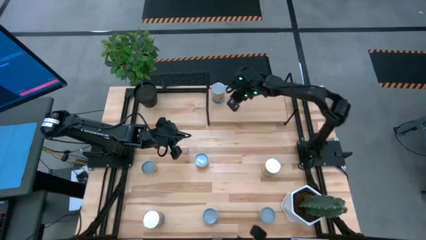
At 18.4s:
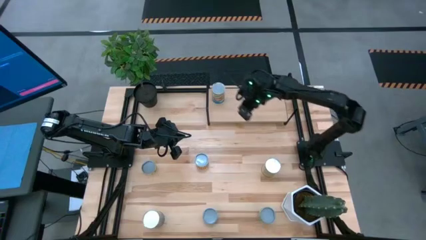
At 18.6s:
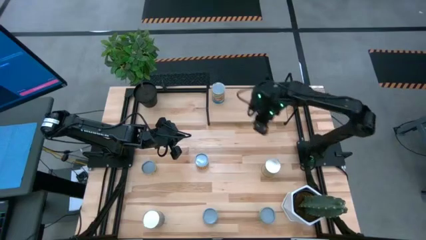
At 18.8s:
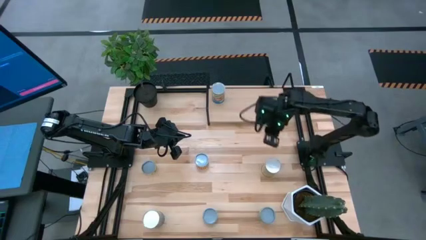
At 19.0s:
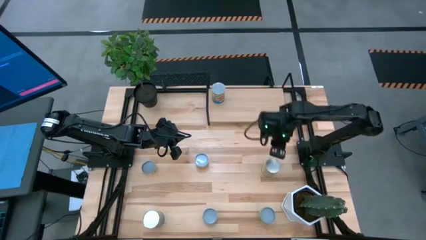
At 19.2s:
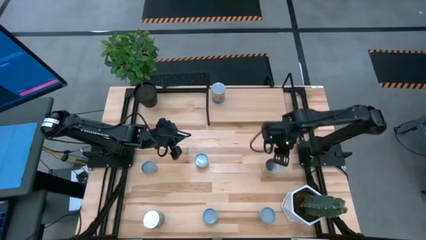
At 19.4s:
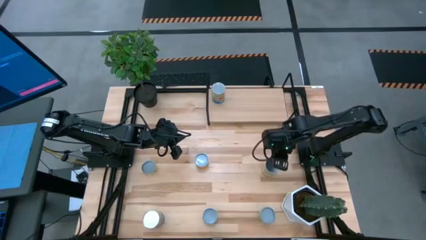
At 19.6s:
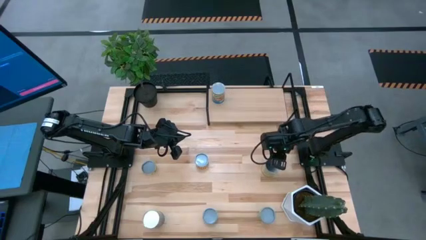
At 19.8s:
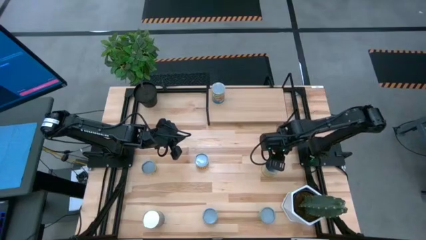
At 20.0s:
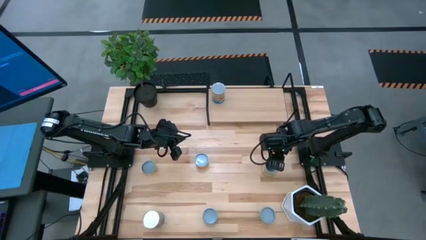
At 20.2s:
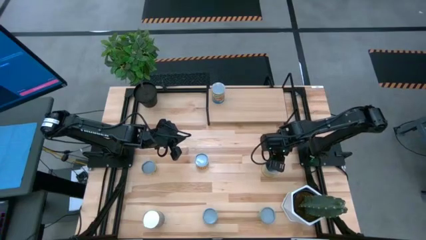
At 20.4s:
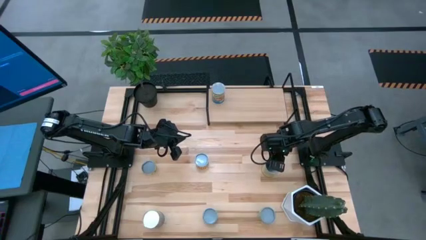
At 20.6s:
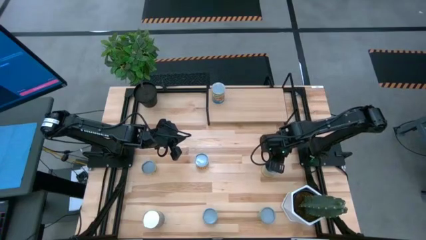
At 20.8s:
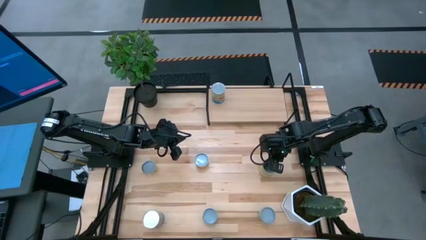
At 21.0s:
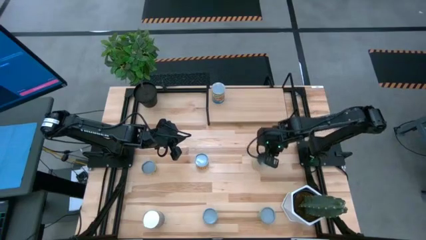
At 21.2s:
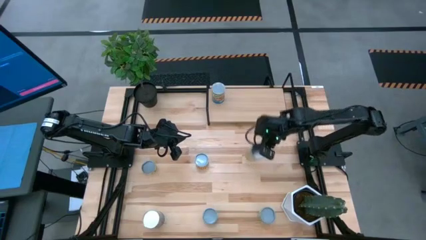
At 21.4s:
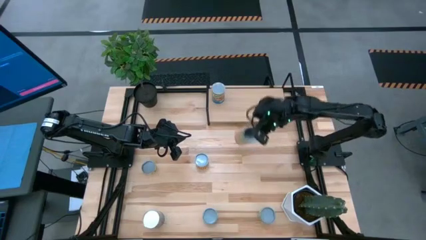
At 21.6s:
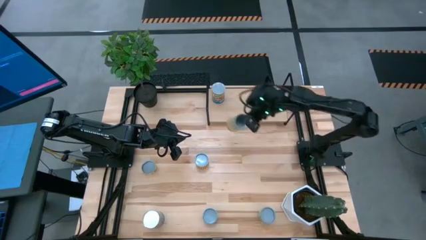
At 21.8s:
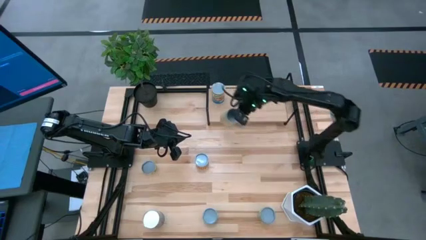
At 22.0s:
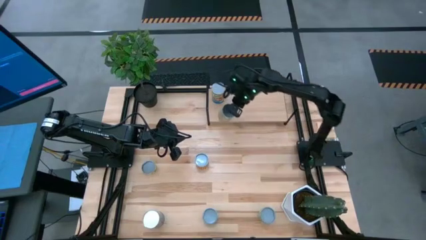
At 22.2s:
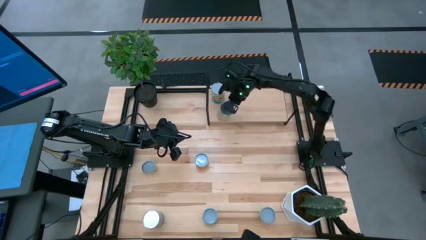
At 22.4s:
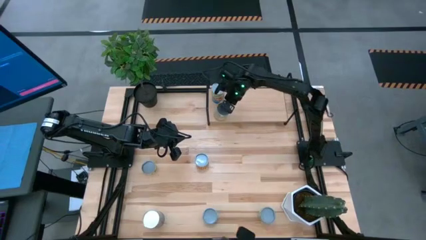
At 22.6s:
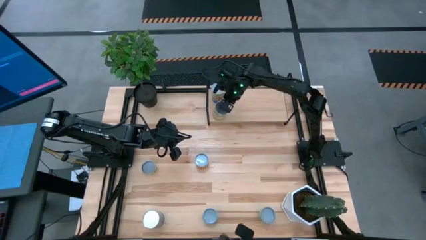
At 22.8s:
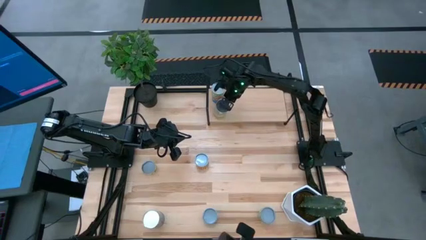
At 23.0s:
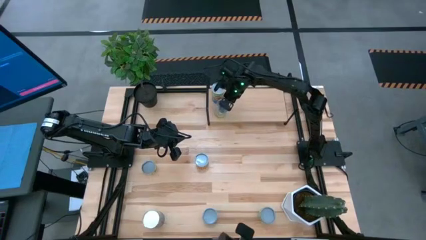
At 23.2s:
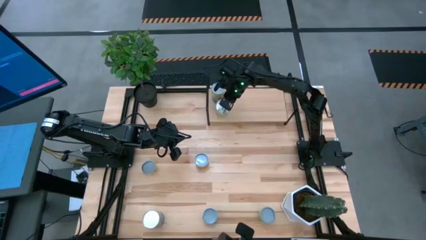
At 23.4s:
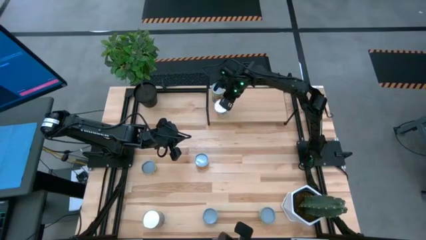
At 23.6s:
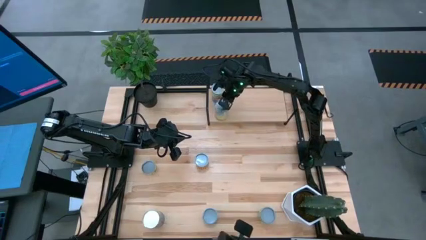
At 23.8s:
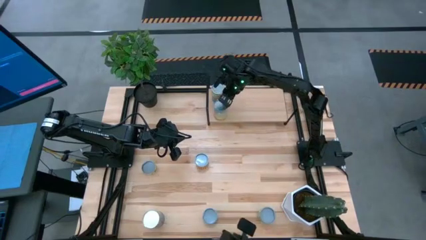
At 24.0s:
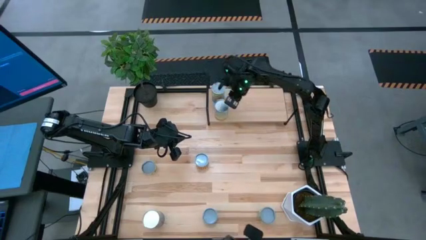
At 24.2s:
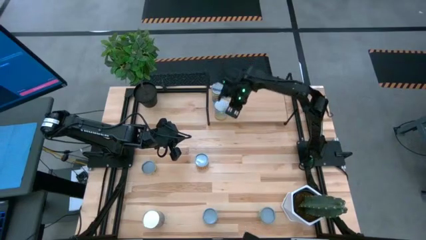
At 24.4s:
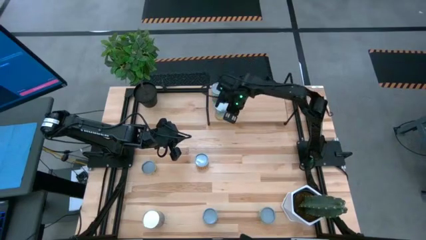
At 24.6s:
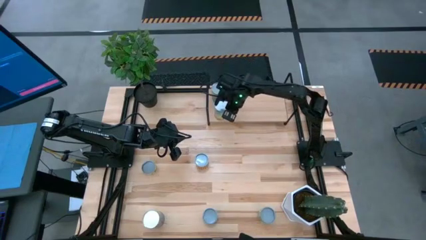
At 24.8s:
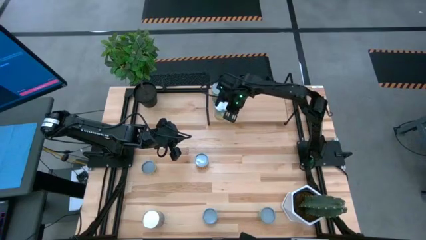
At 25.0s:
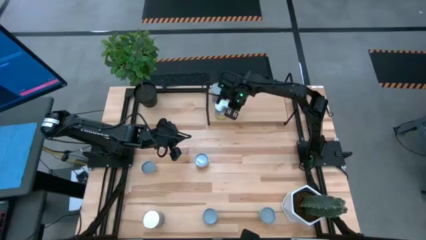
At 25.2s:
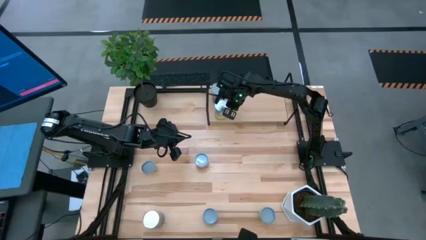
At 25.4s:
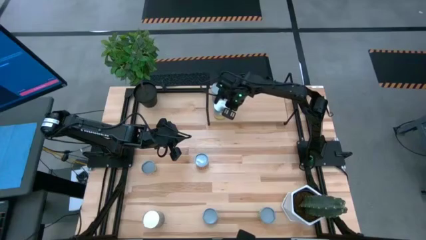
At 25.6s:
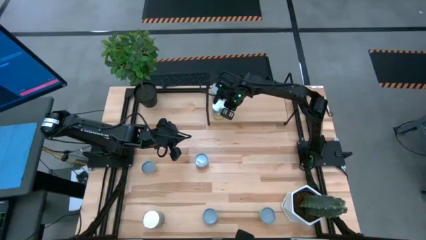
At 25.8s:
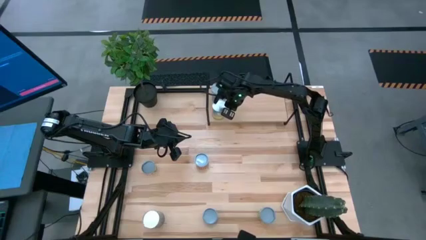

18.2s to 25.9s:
Task: Pick and place cans onto a shelf
Put the canned carrots on the shelf

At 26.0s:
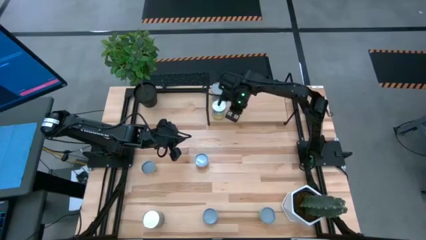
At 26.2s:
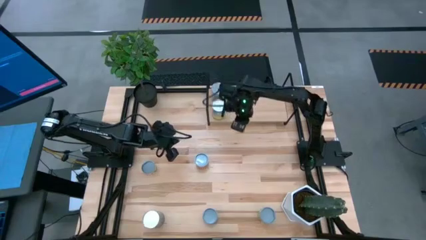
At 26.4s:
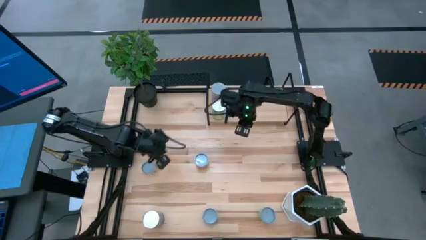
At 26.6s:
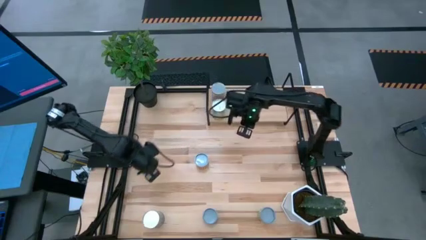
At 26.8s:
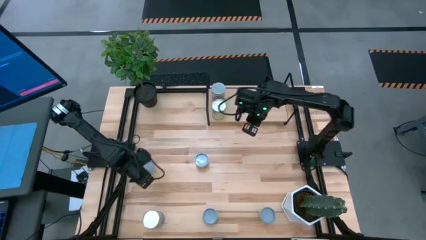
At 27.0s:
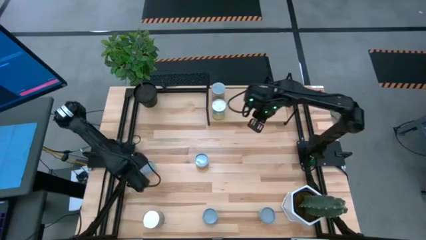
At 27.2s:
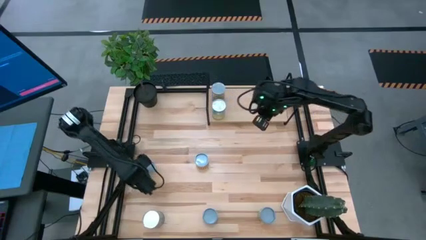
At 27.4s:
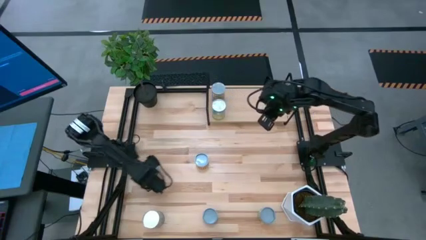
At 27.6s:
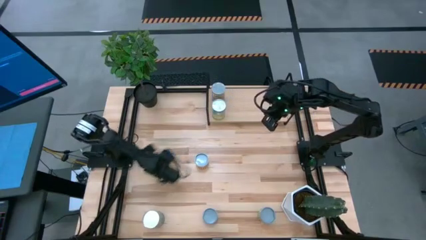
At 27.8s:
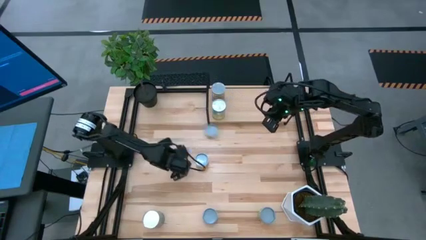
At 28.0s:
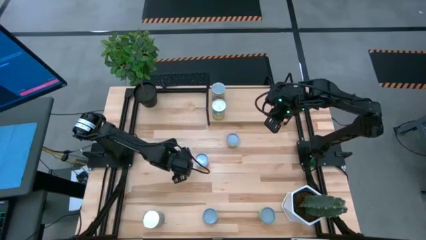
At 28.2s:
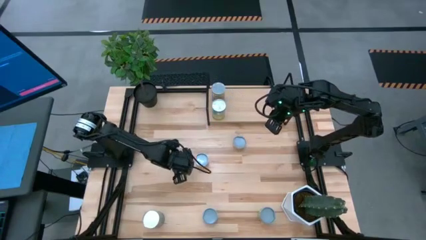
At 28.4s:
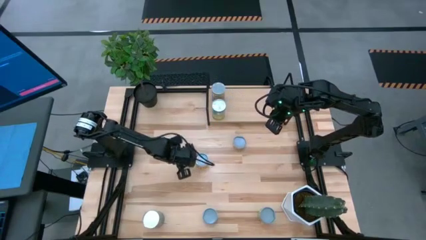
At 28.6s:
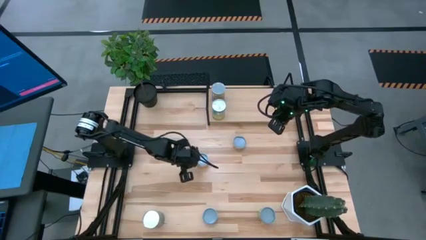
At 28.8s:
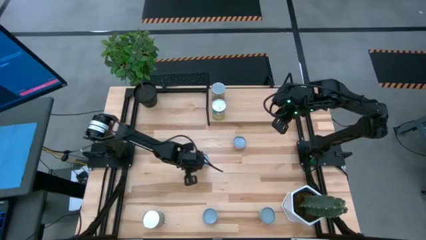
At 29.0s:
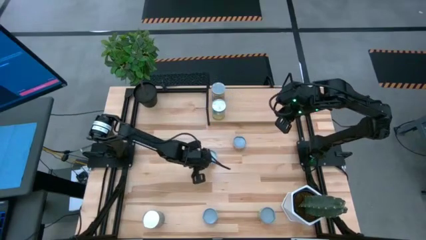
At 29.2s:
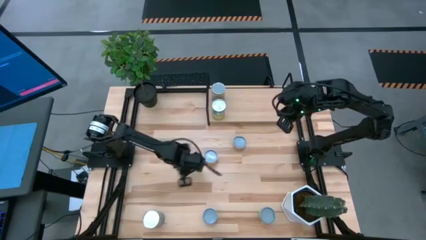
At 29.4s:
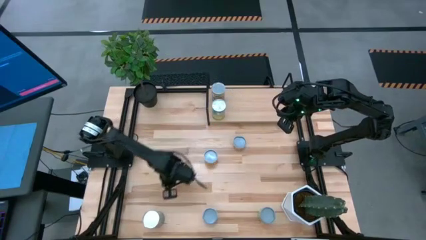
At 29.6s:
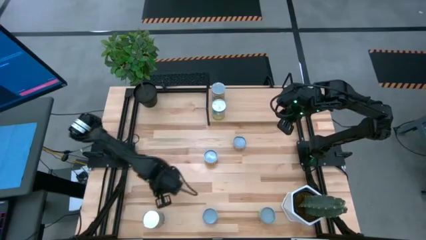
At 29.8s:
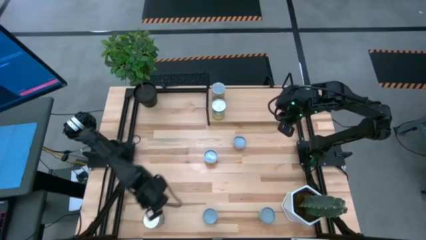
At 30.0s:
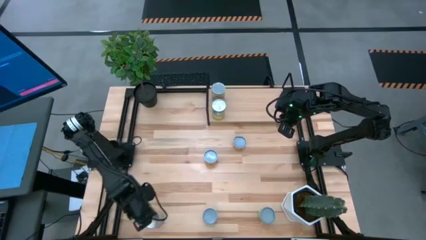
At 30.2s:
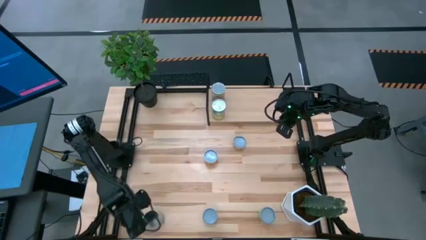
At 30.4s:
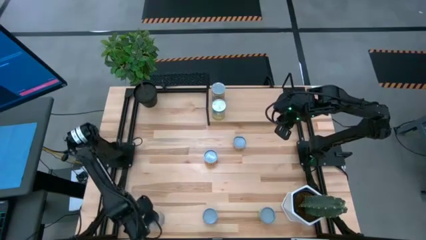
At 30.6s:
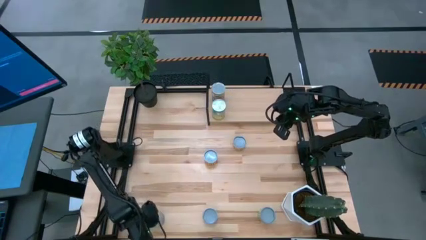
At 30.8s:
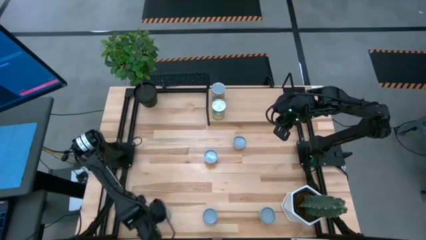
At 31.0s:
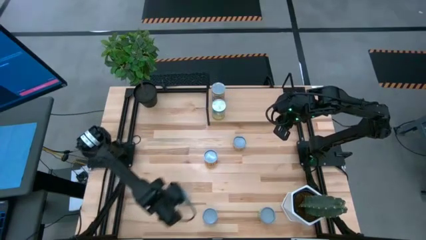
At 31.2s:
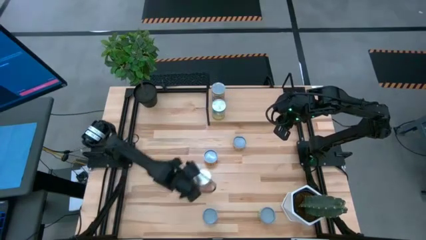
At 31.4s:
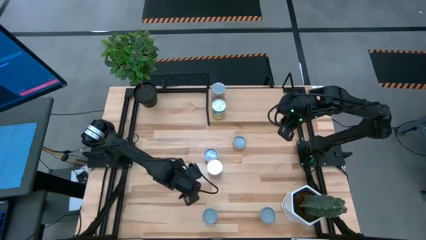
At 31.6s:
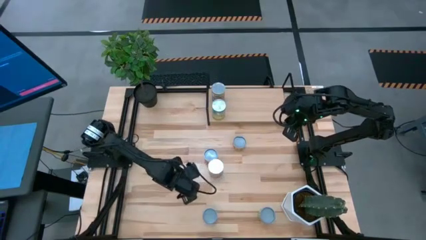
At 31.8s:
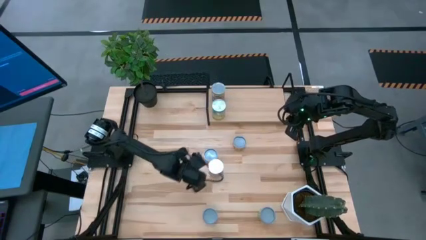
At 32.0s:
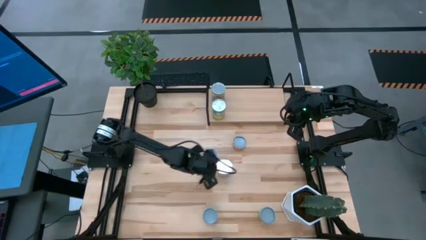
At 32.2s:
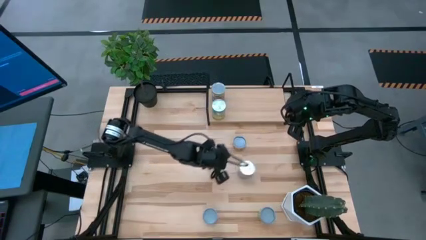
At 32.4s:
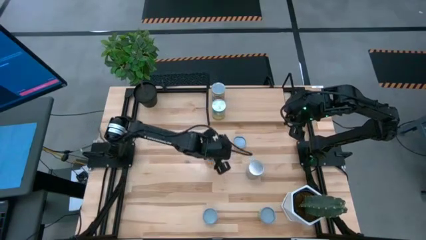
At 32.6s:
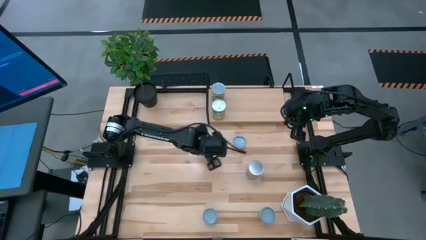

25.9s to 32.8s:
Move the canned goods to the center of the table
